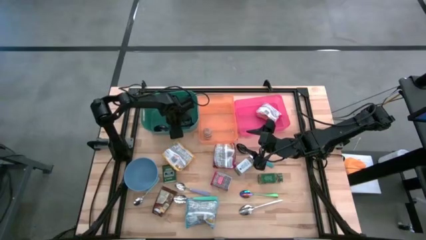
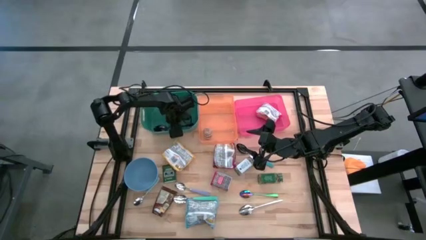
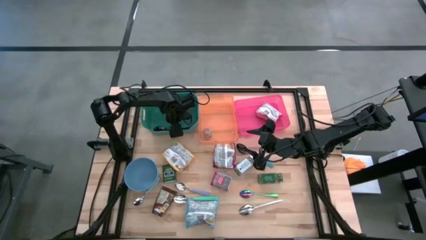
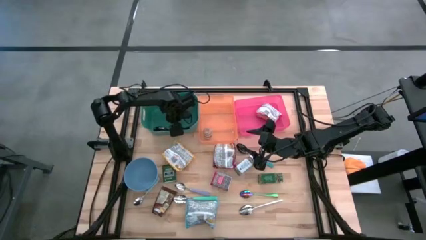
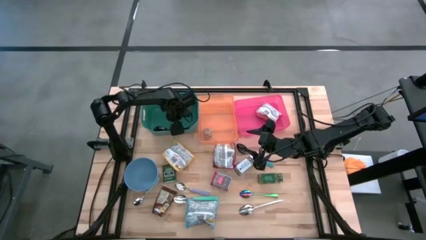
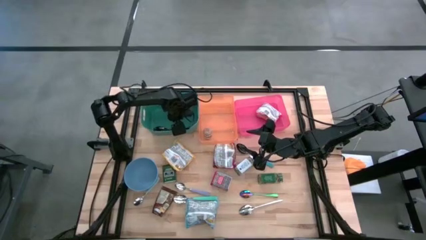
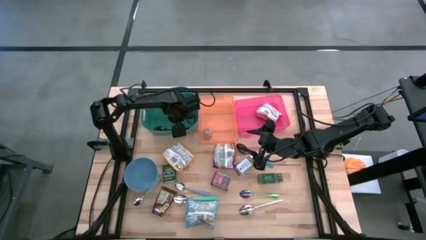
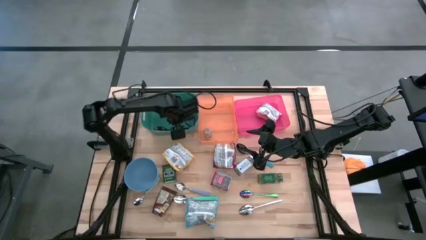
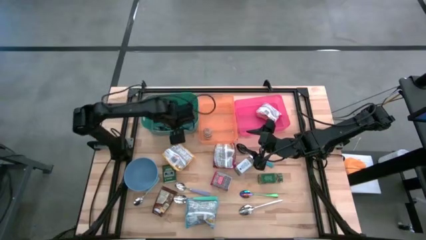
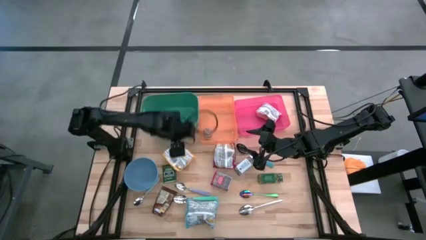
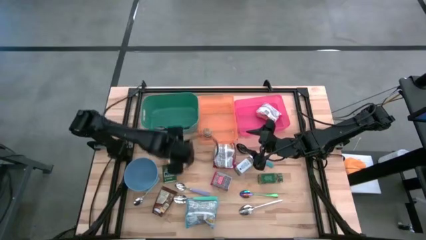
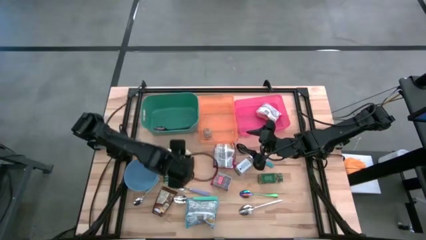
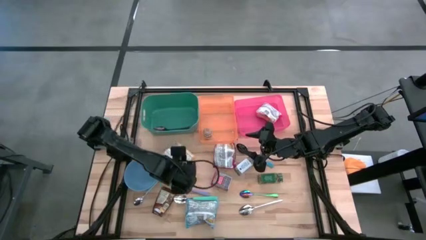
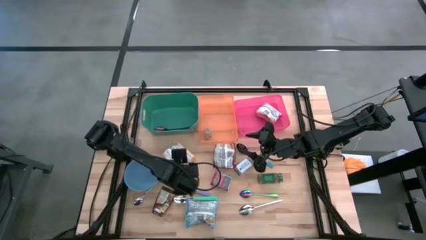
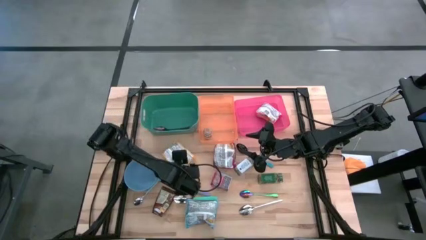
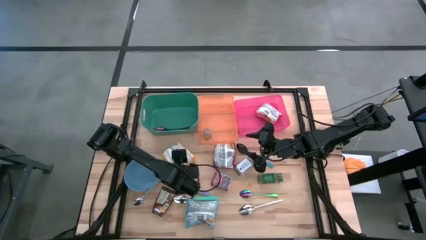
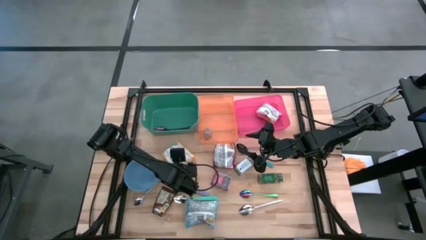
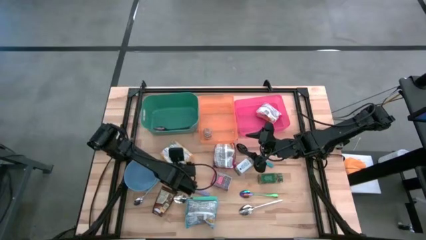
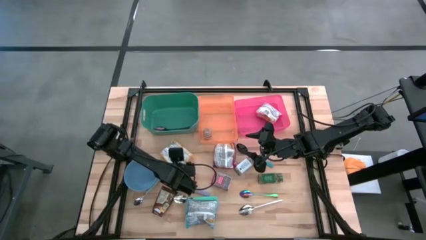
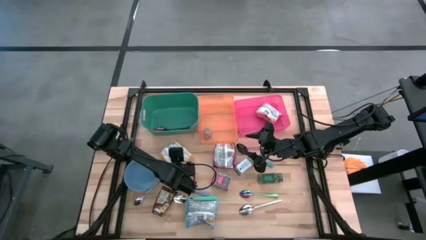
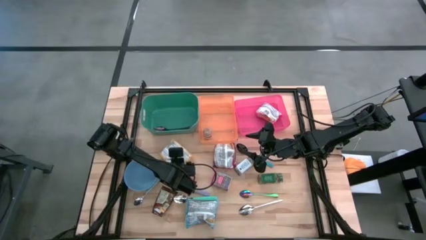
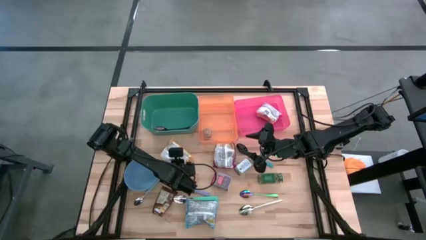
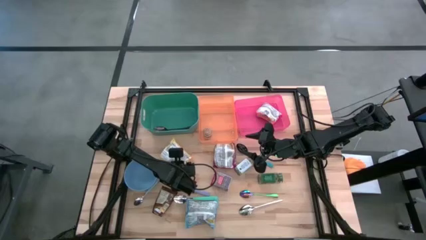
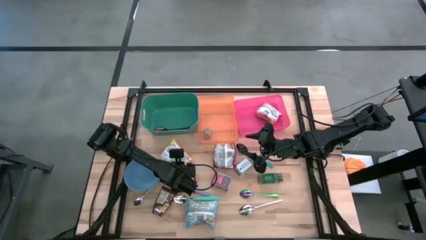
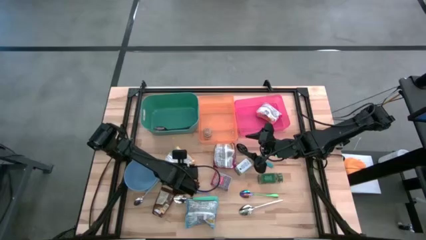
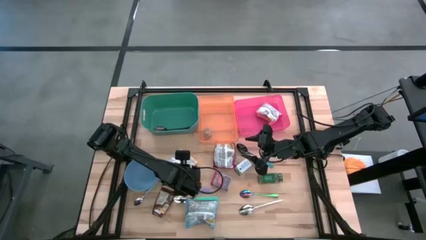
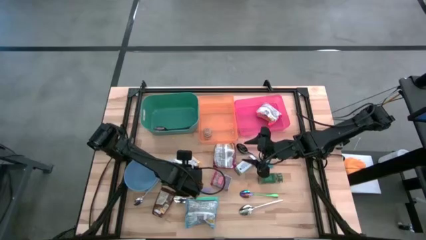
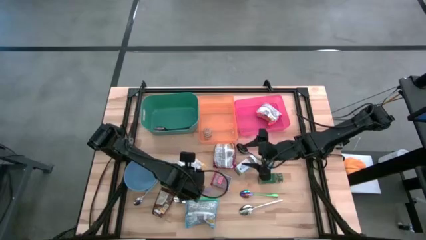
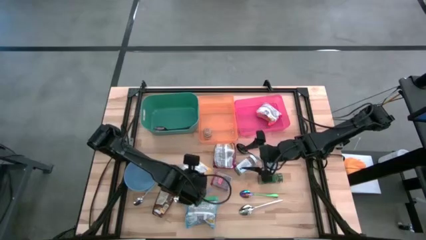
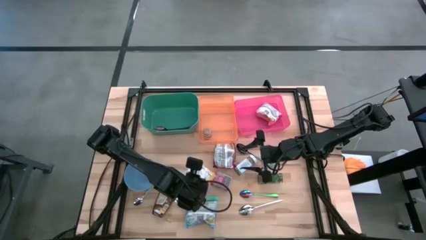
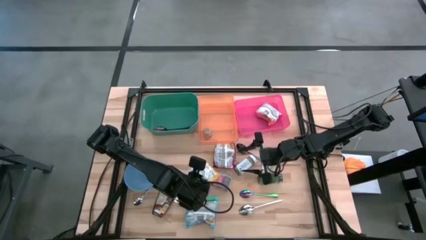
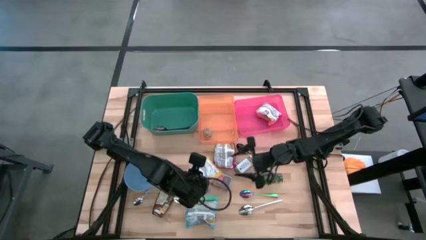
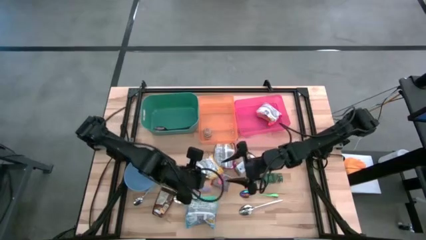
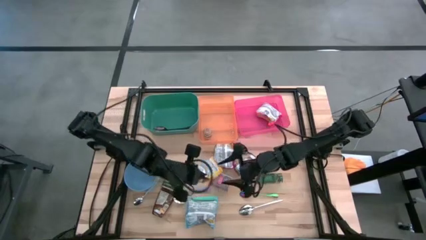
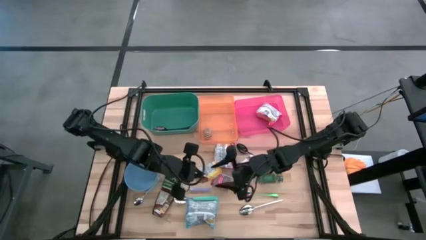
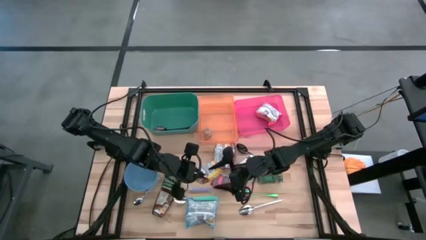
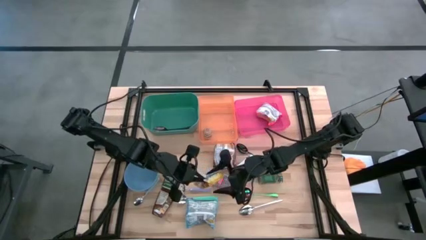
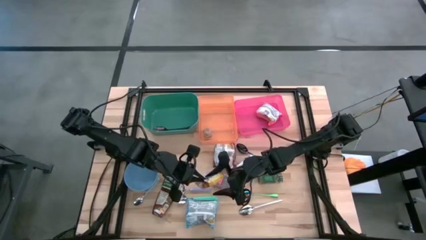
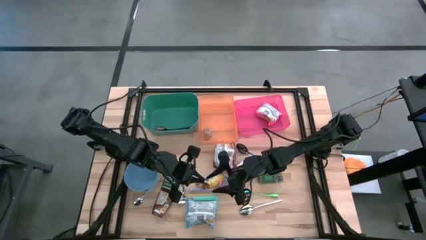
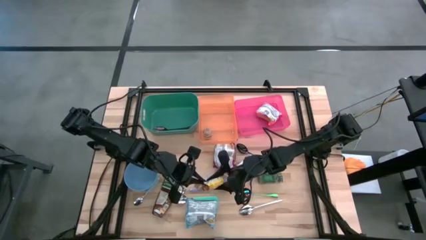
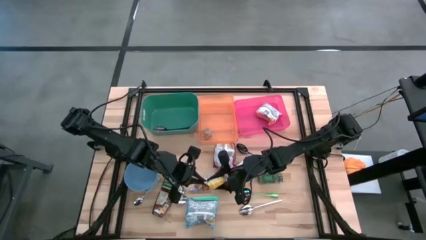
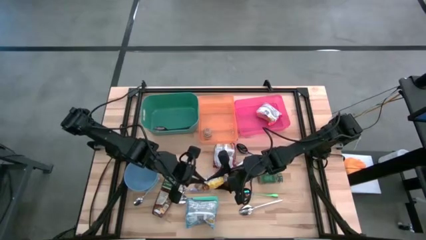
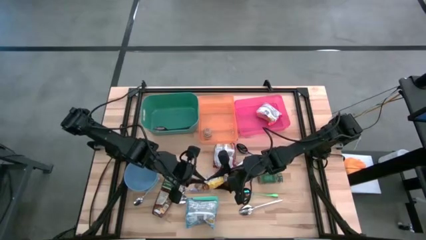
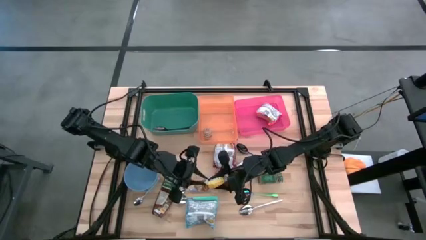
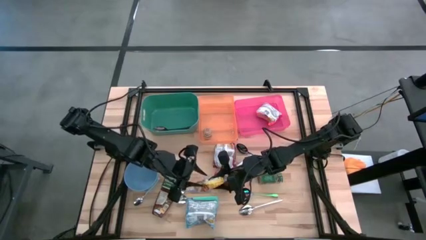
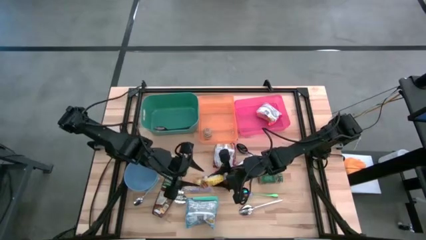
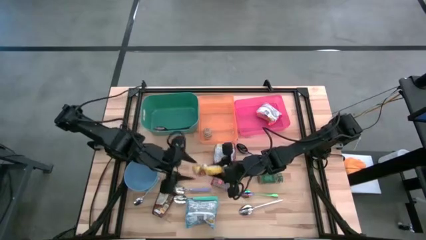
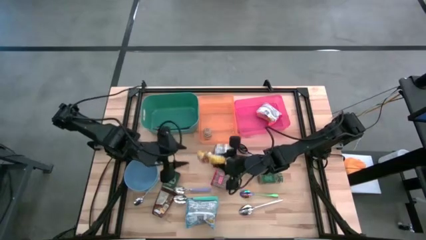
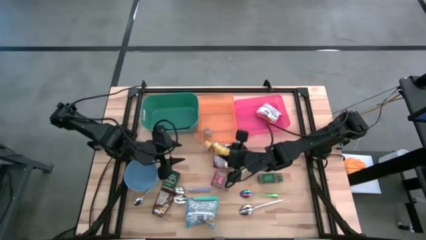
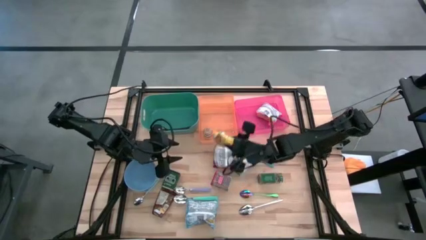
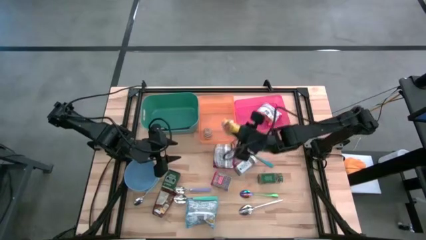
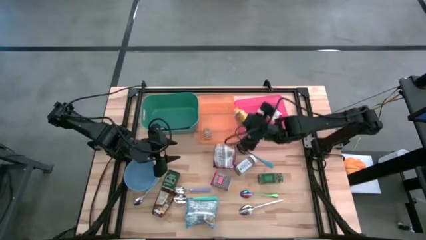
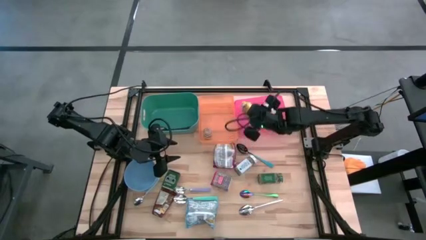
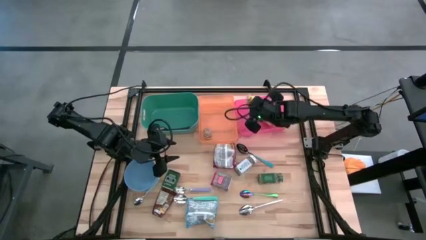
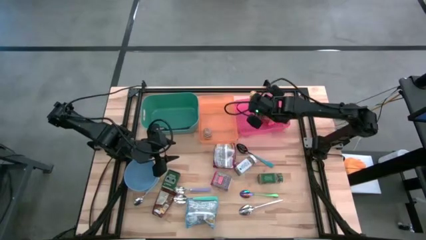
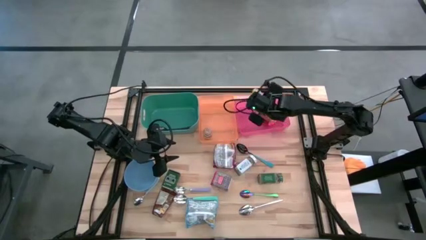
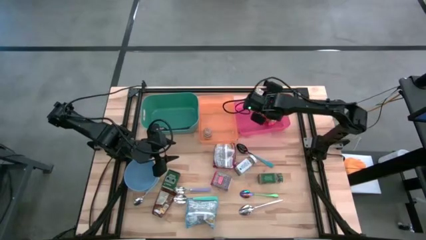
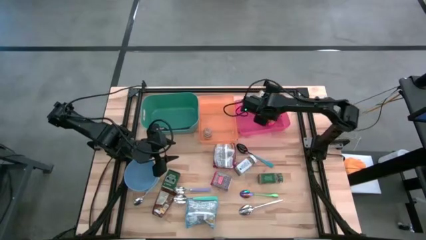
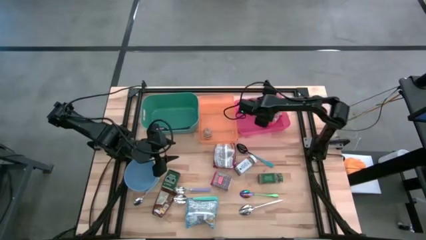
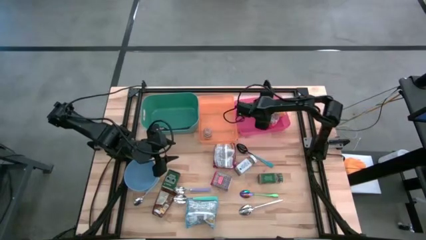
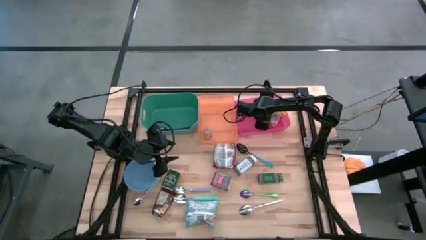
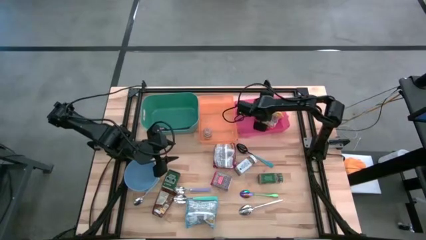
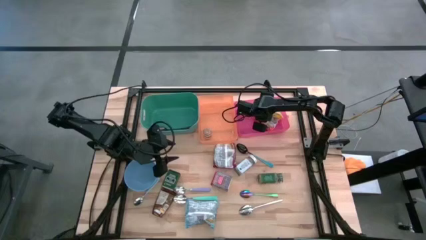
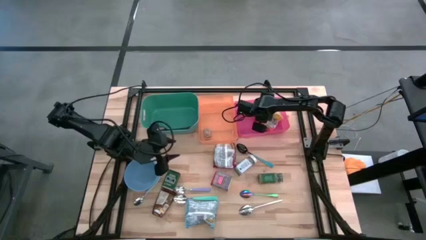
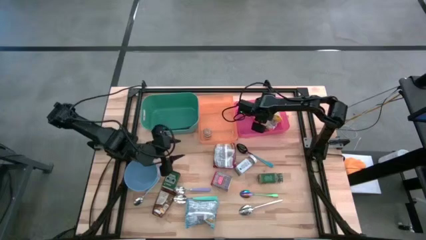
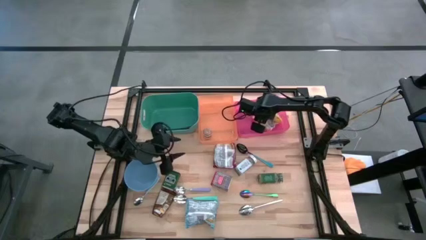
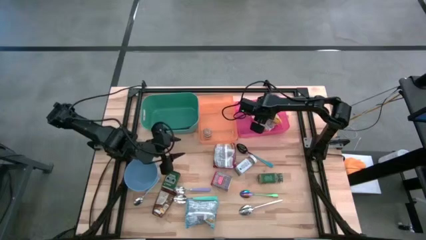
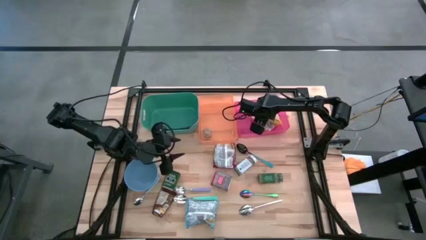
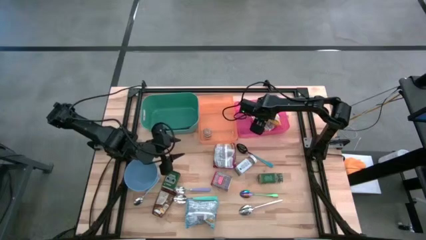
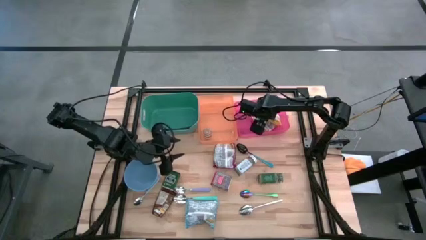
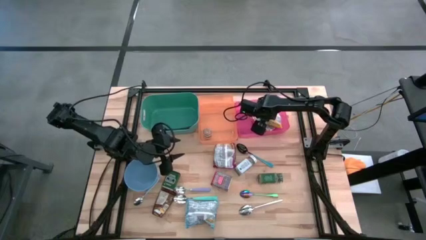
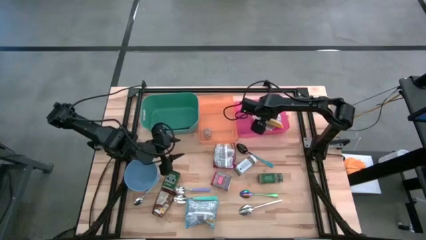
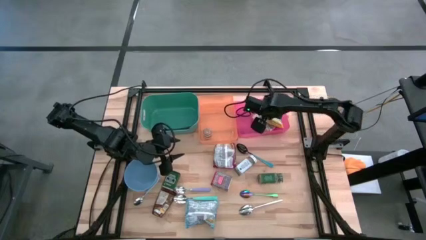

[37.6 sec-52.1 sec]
Put the yellow noodle pack into the pink bin

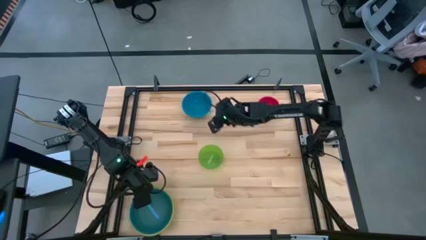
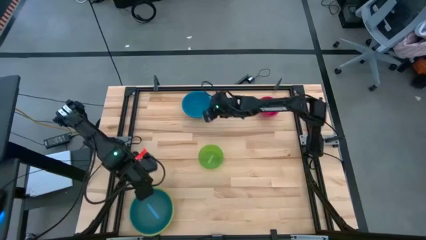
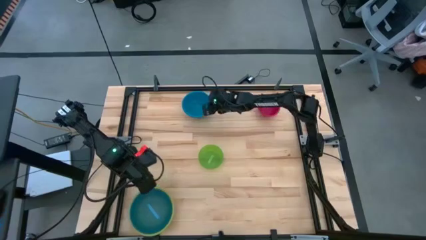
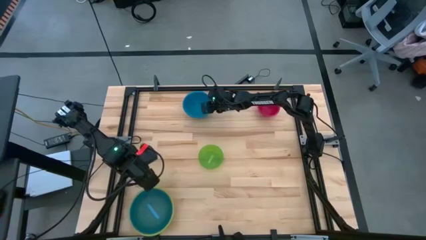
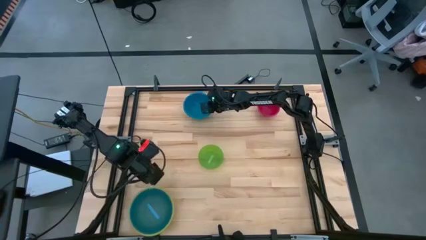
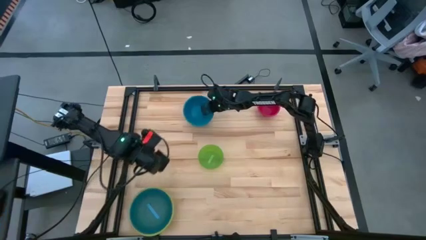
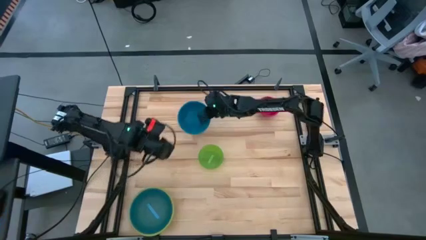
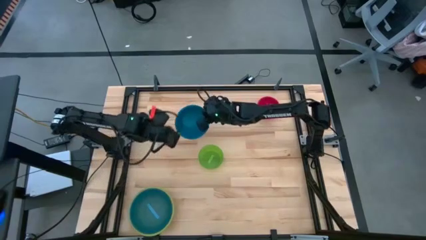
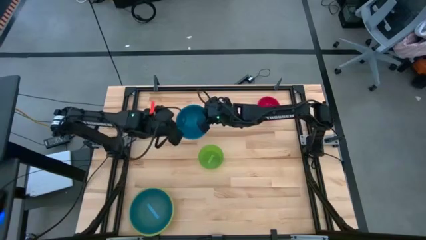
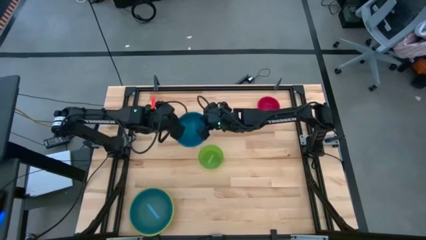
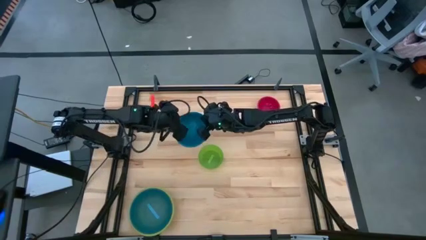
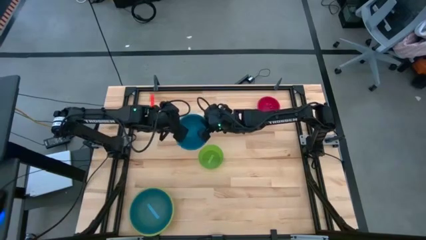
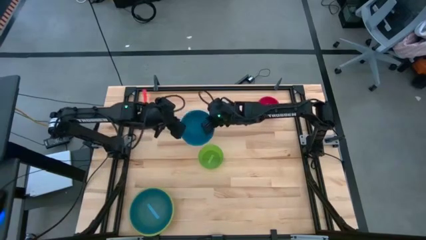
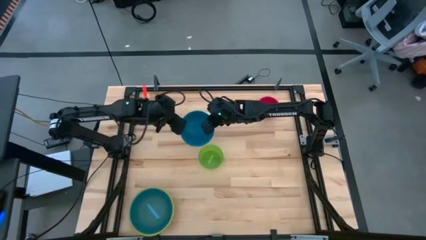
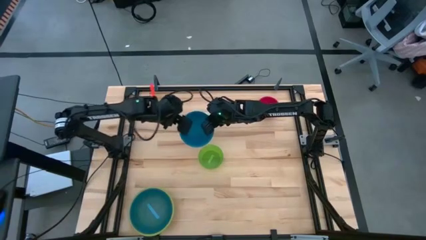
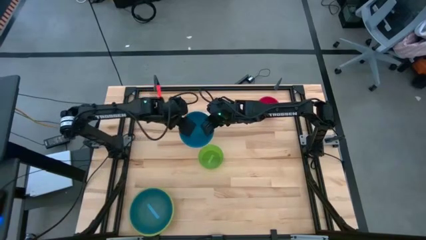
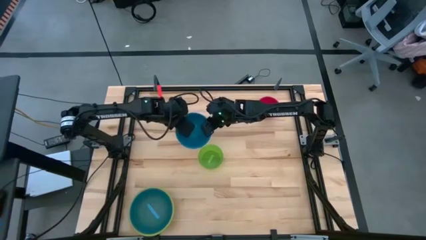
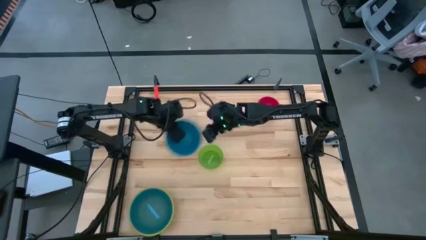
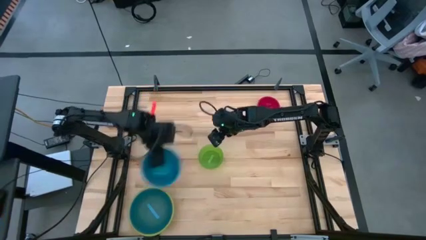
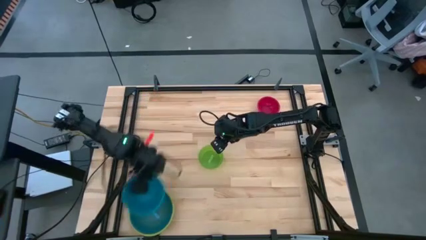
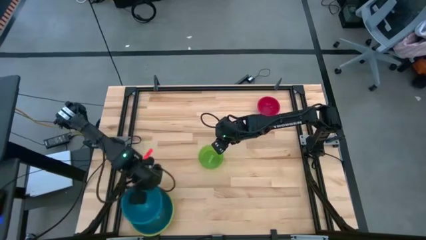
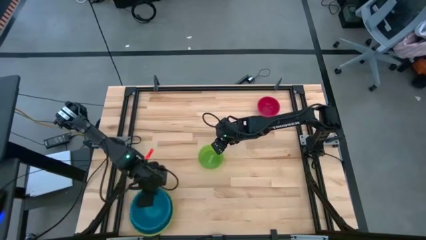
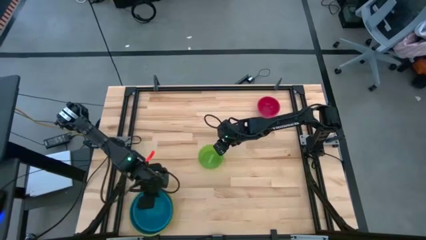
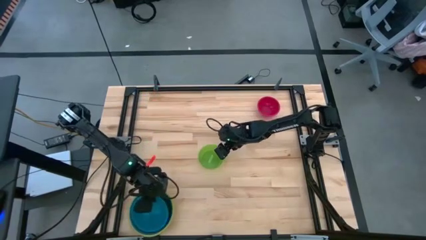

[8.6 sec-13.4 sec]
Stack the blue bowl on top of the light blue bowl
